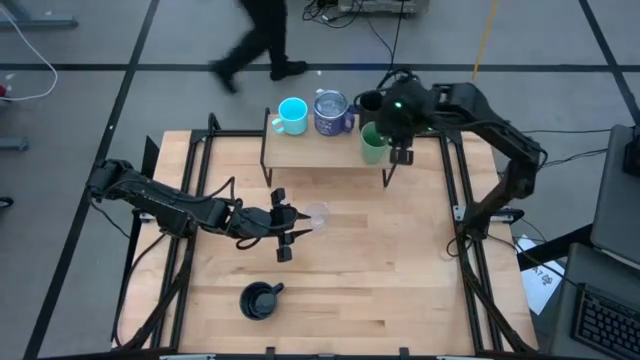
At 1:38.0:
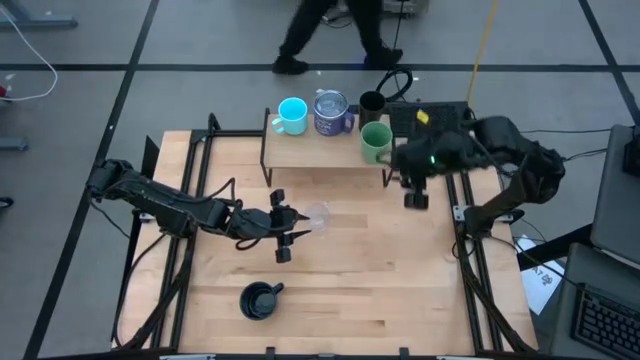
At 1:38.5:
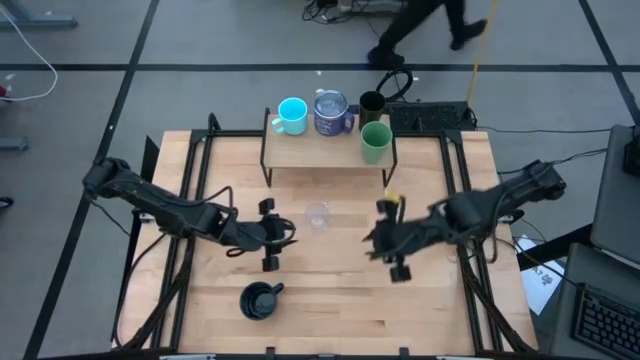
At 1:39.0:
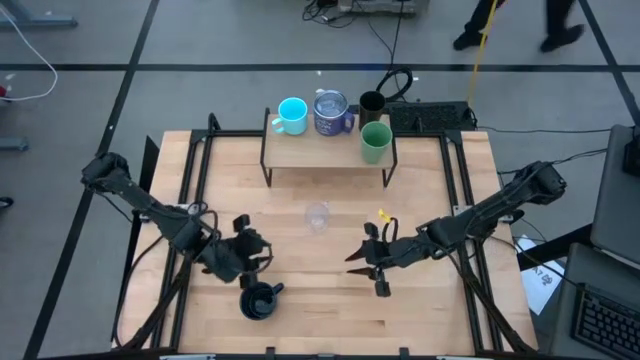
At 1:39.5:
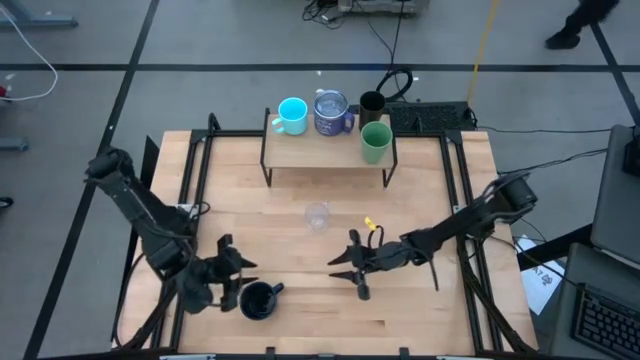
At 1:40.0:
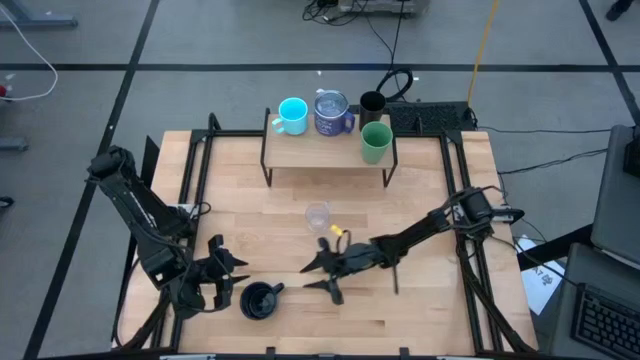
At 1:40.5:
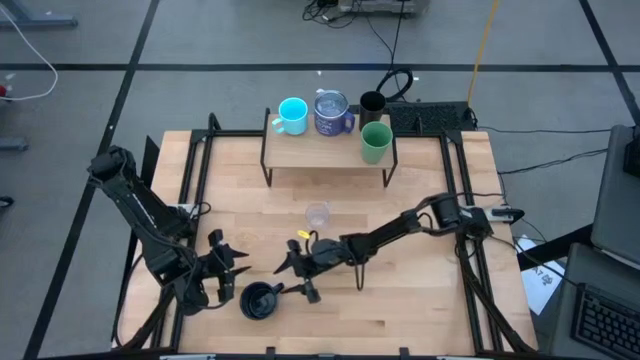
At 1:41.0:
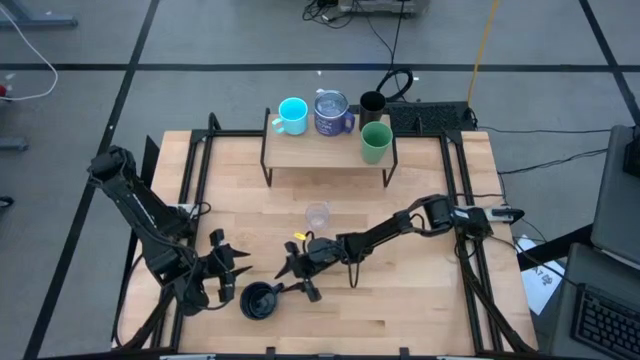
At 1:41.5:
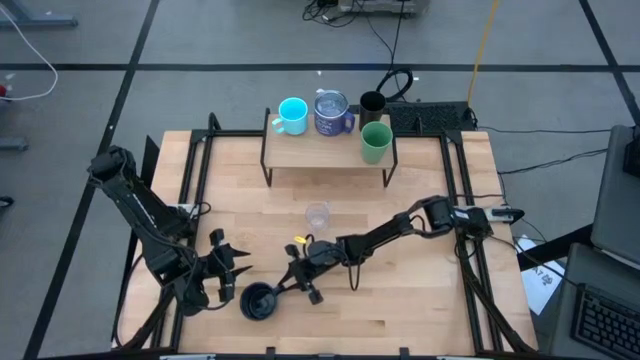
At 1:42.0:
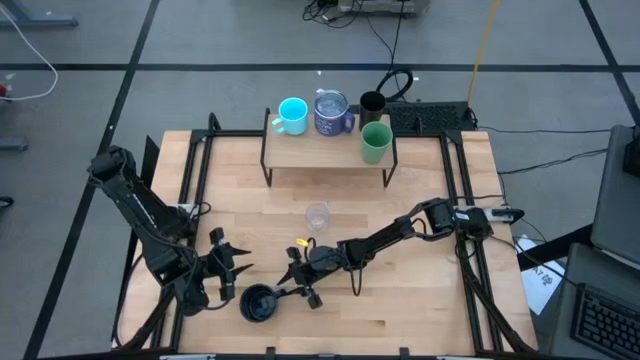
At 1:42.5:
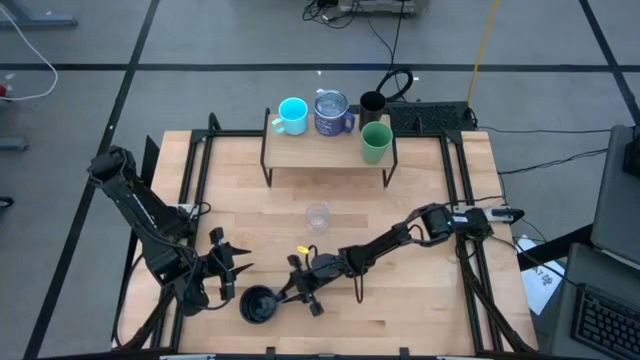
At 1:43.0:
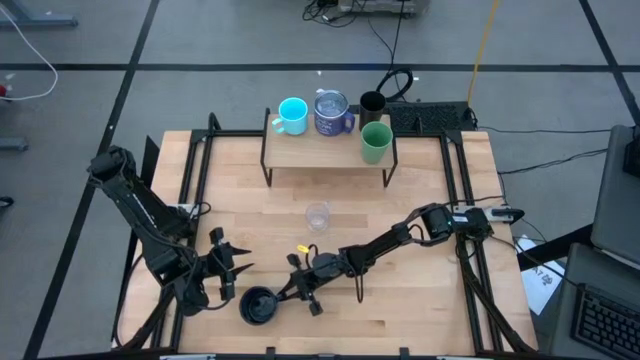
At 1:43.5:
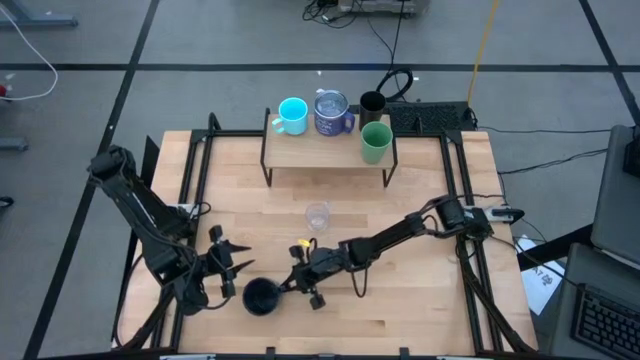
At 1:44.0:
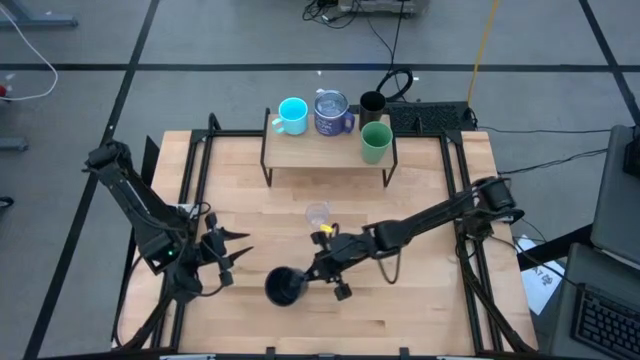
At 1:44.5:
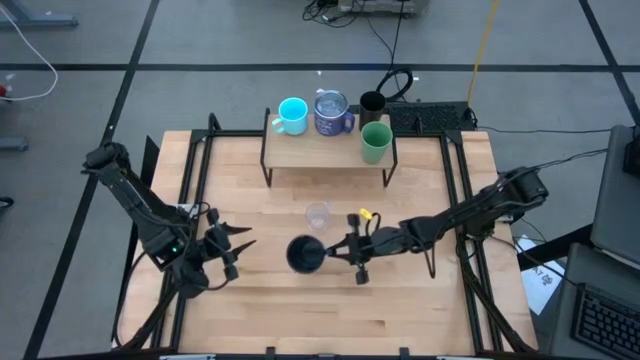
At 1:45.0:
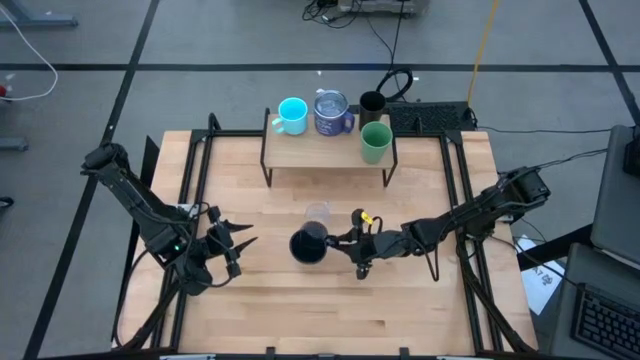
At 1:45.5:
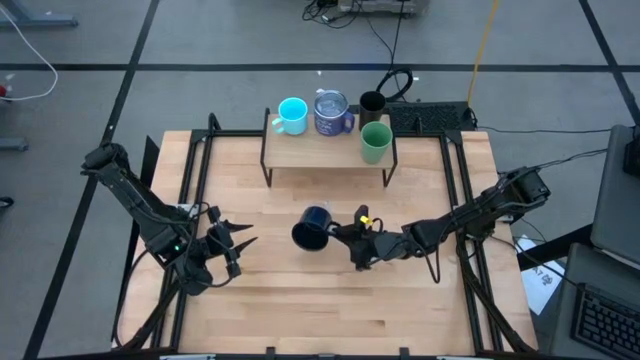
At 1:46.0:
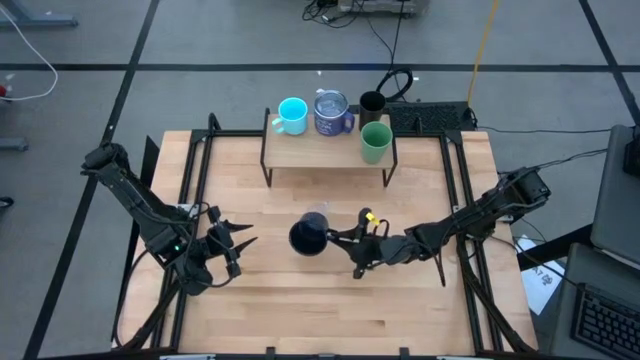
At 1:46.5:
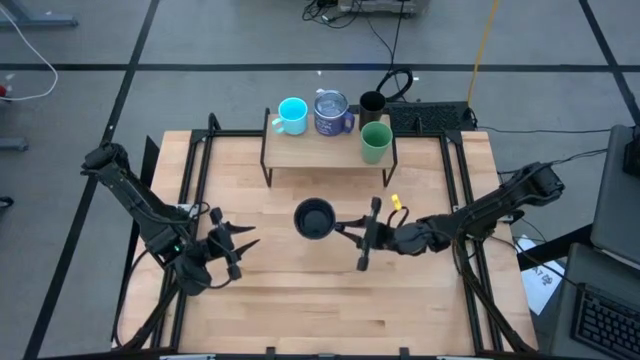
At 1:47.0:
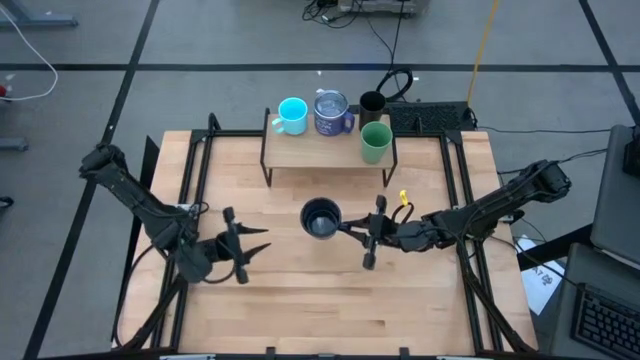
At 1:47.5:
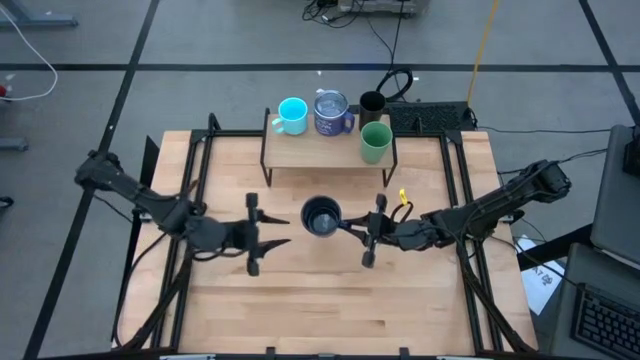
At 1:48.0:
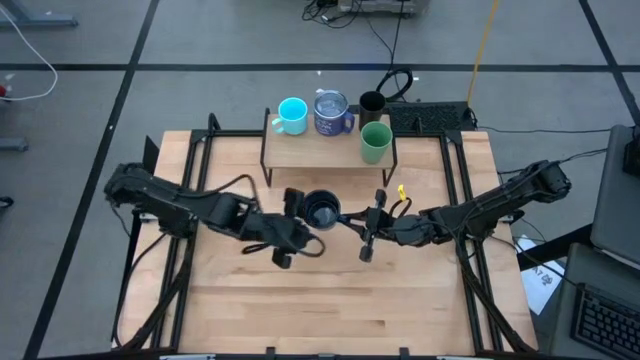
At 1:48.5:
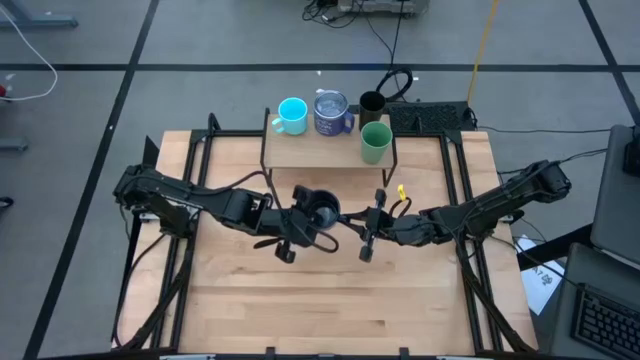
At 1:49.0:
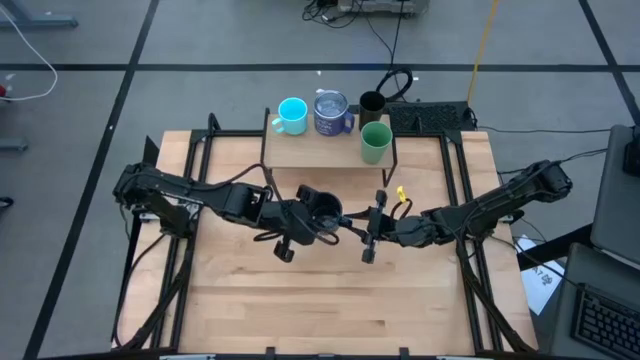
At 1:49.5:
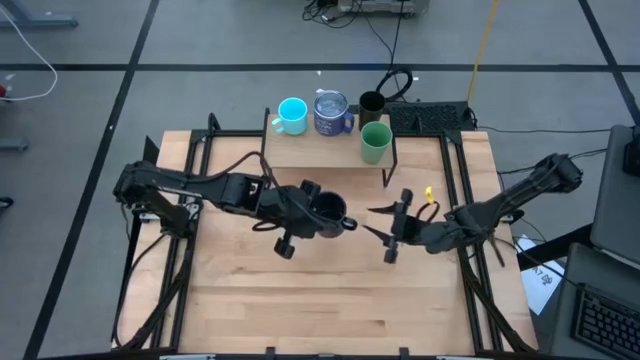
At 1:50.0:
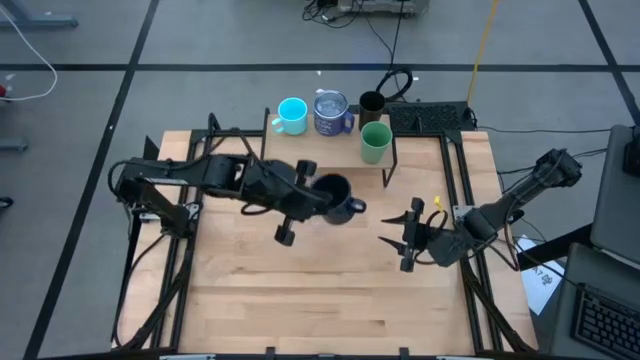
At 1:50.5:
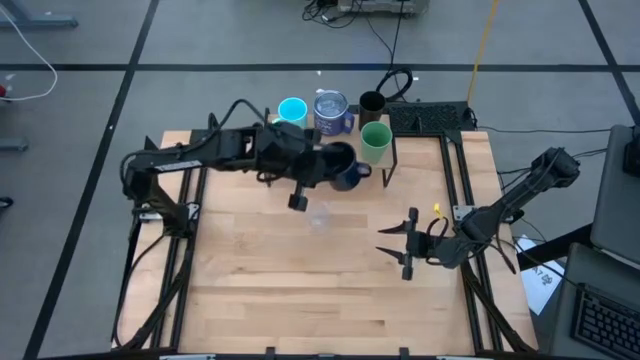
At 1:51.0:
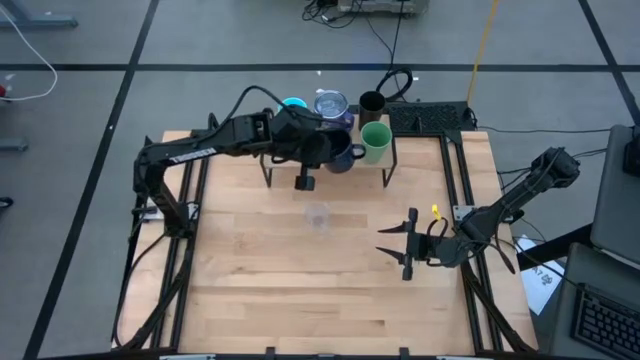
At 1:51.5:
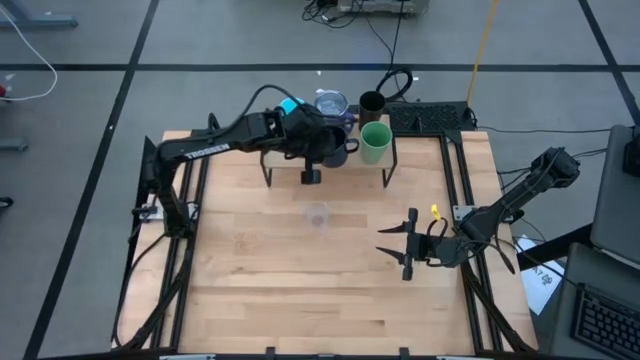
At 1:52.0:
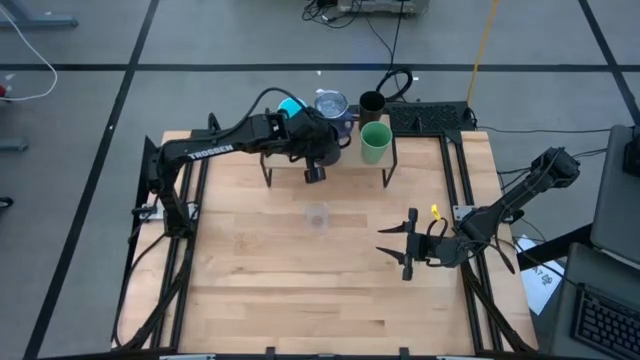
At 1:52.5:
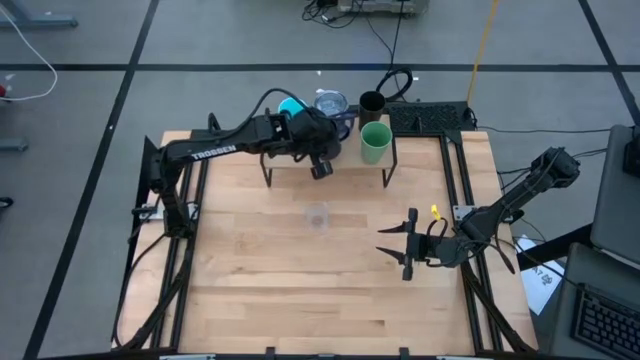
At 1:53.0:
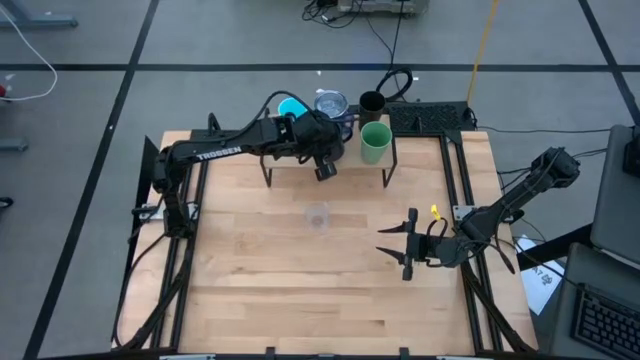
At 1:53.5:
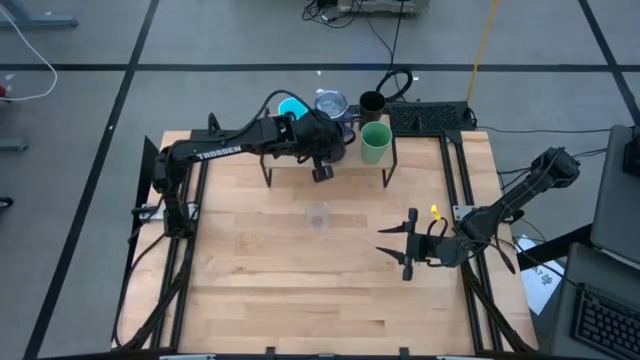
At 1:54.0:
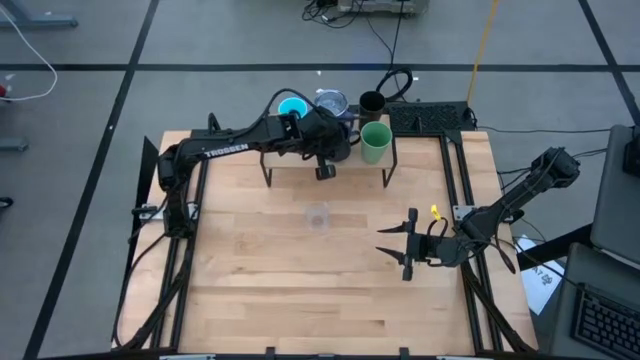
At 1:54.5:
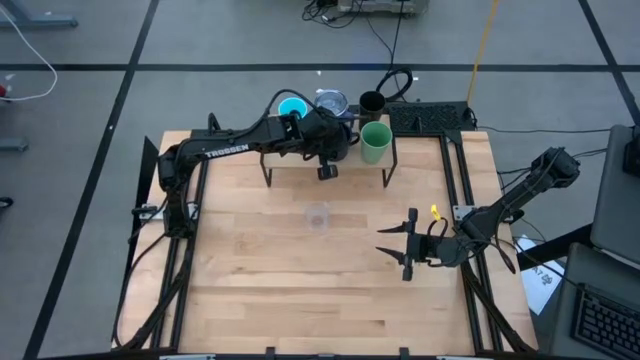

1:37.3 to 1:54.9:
Task: Stack small to large cups/mugs on shelf
Put the dark blue mug on the shelf aligned with the other blue mug

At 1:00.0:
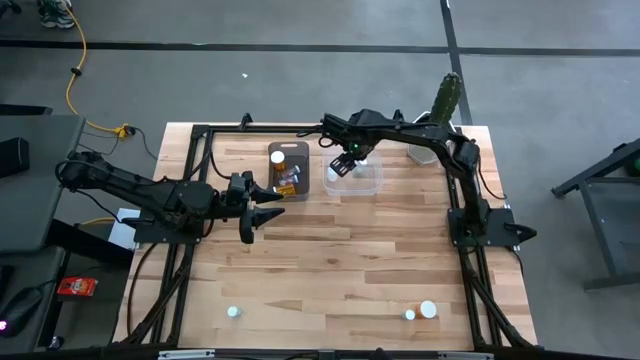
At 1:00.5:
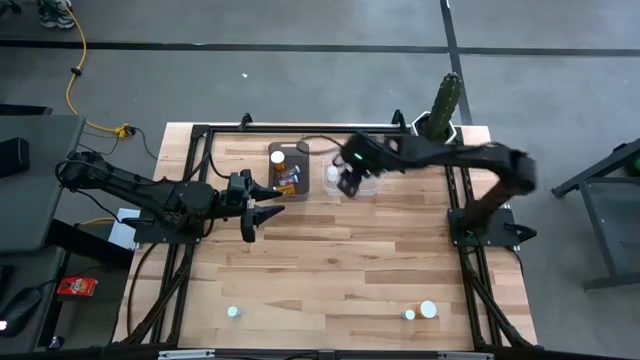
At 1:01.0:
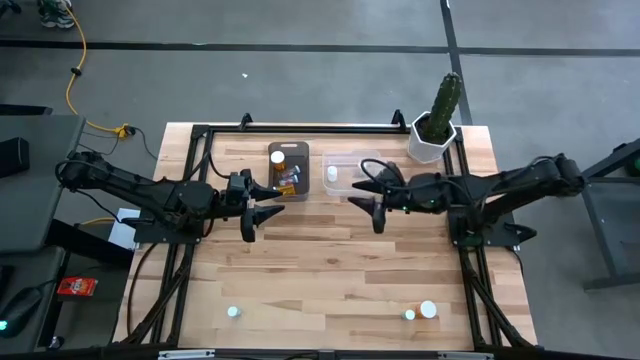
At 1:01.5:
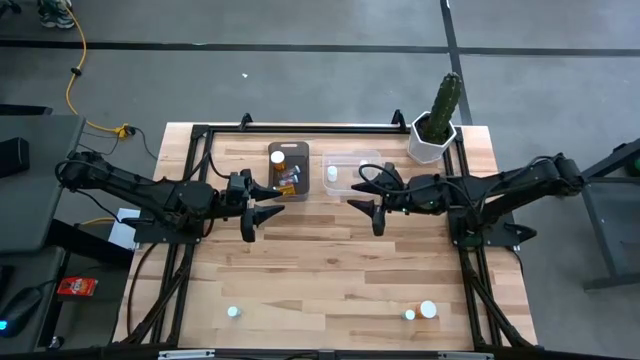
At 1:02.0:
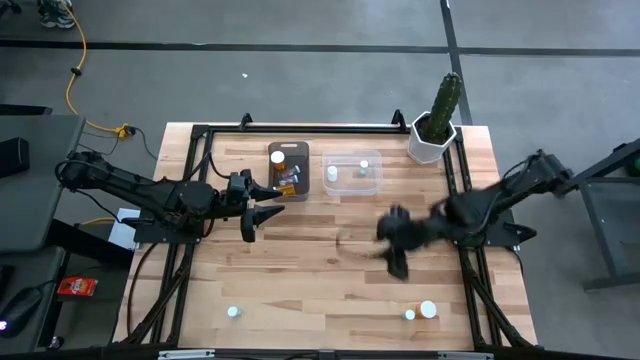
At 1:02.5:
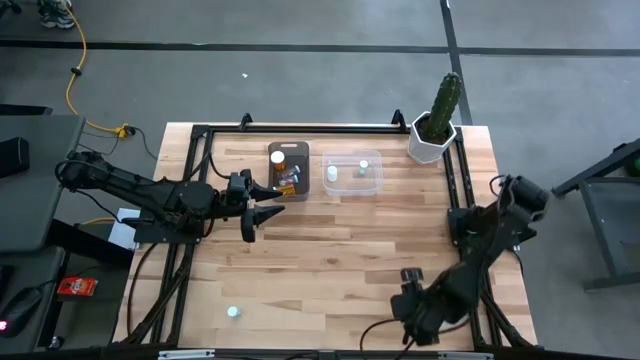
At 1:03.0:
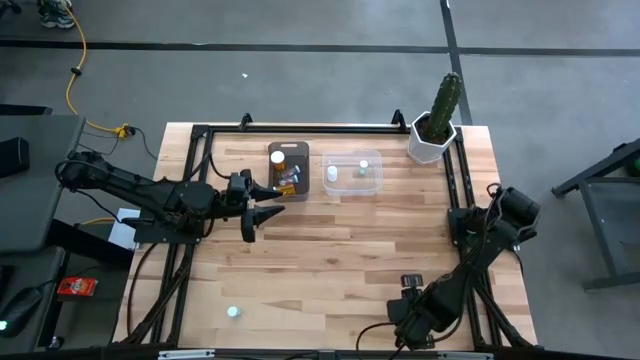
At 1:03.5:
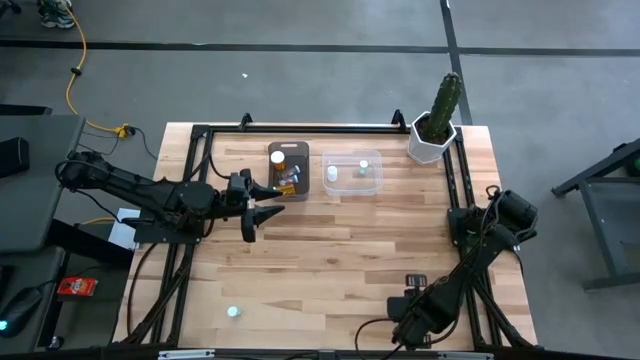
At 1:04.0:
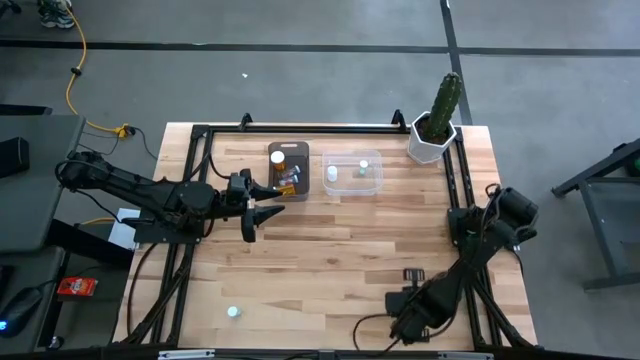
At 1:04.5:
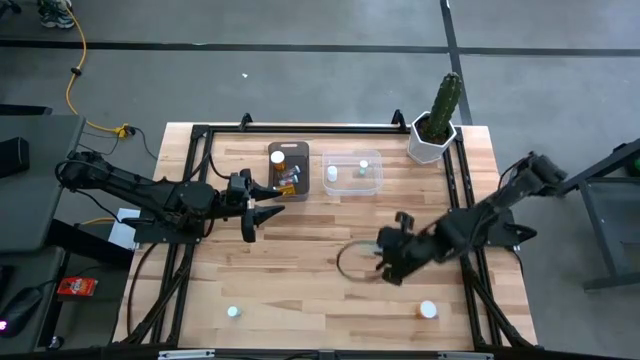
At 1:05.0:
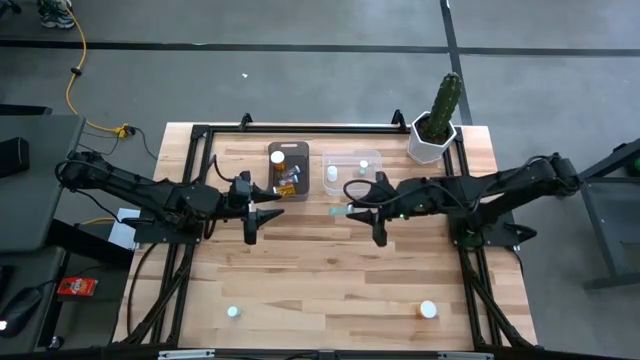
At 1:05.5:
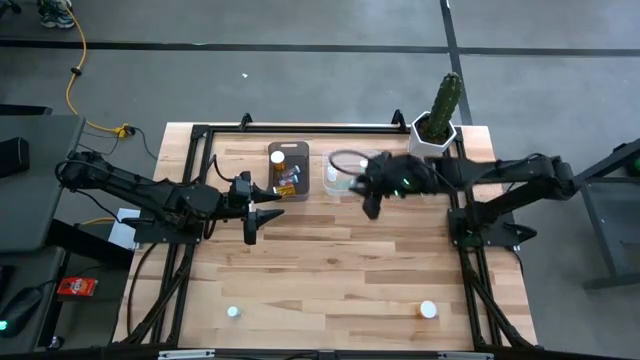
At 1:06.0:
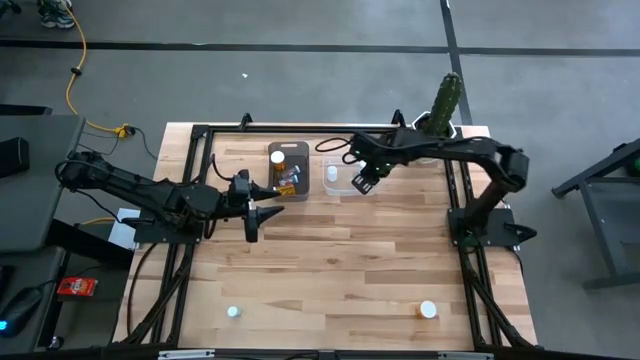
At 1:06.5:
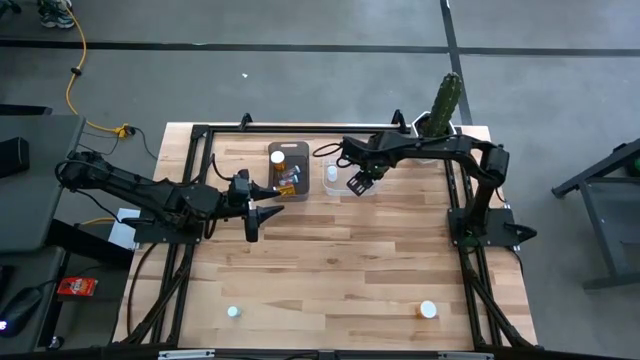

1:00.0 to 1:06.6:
Task: Pick and place medicine bottles into bin by pill shape (circle, oval)
Put the right green tablet bottle into the transparent bin
